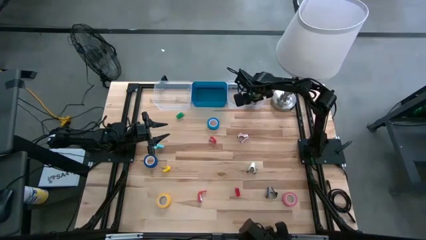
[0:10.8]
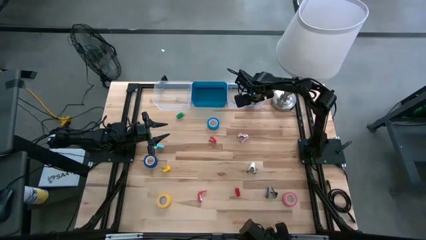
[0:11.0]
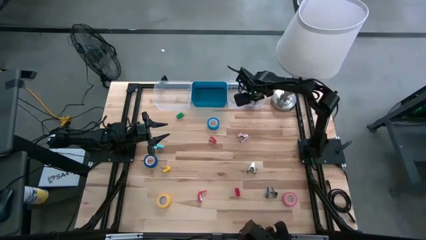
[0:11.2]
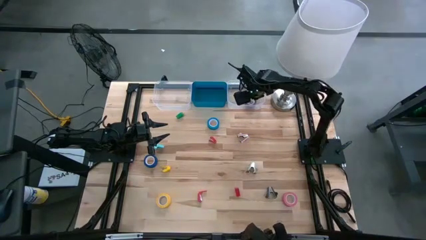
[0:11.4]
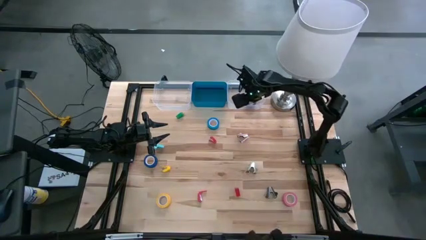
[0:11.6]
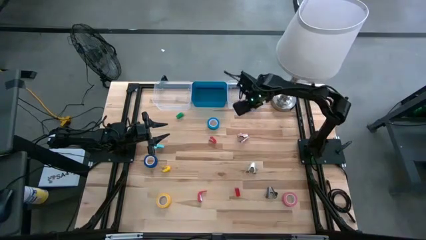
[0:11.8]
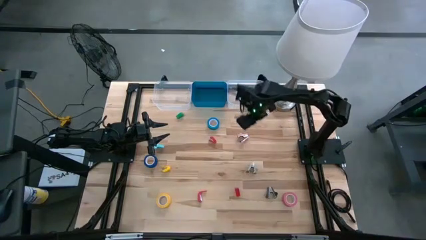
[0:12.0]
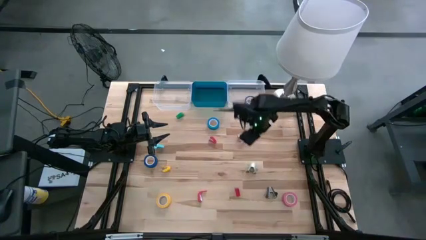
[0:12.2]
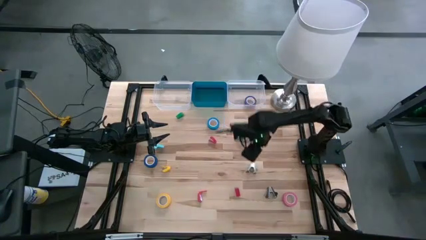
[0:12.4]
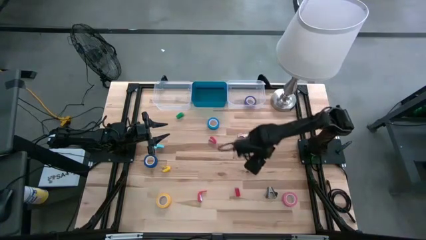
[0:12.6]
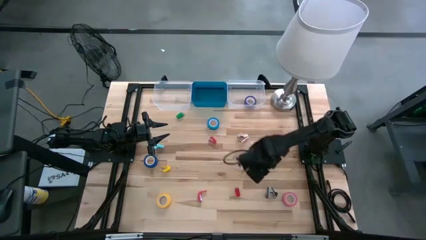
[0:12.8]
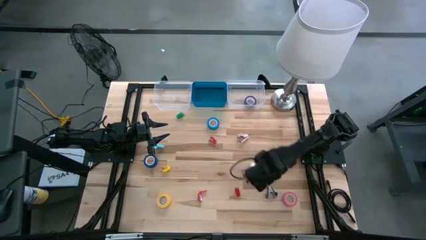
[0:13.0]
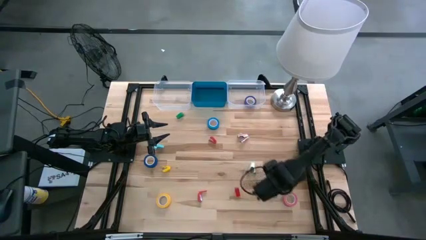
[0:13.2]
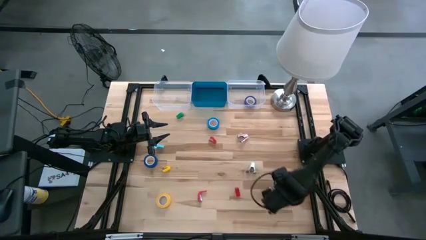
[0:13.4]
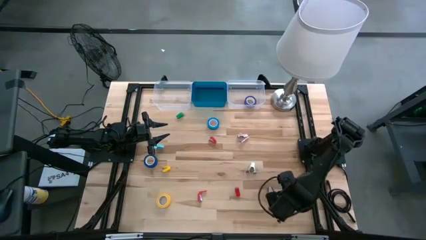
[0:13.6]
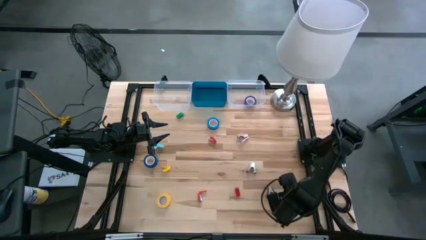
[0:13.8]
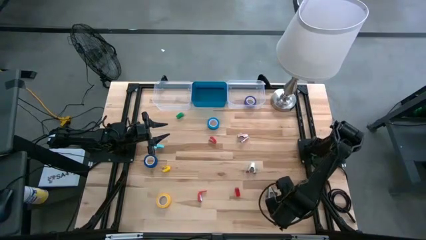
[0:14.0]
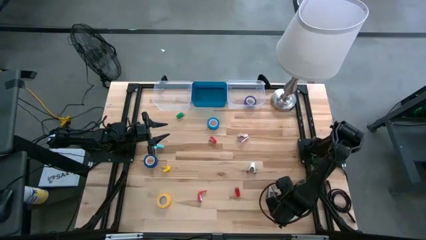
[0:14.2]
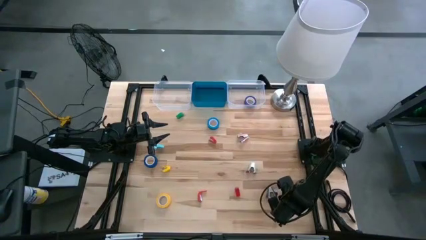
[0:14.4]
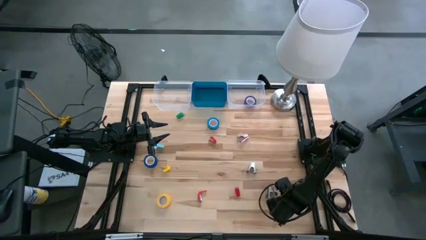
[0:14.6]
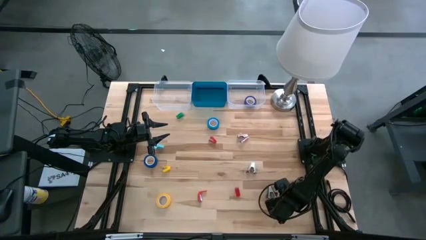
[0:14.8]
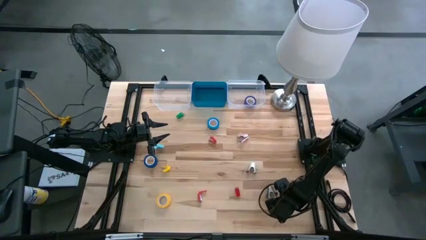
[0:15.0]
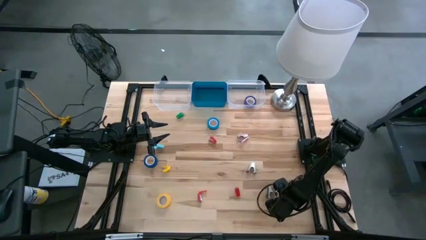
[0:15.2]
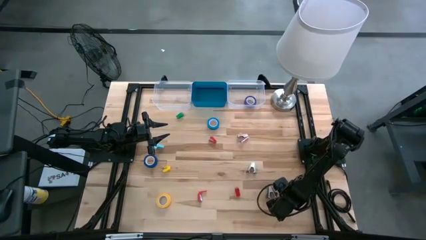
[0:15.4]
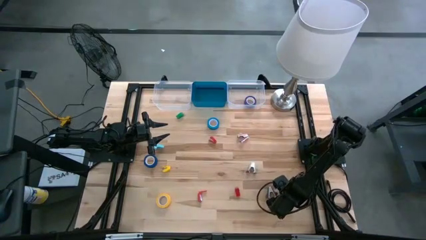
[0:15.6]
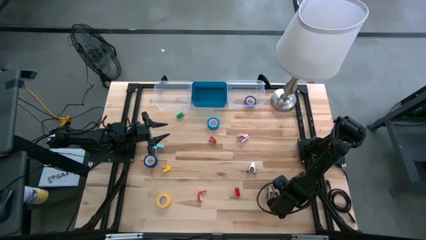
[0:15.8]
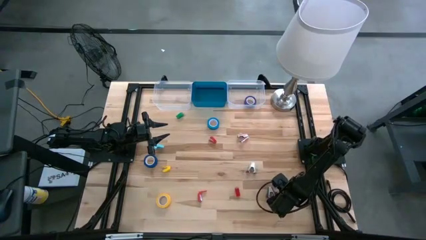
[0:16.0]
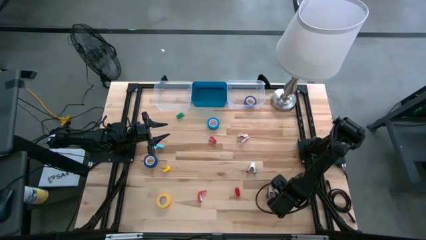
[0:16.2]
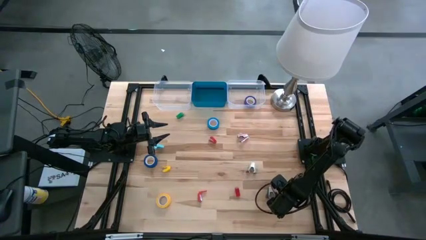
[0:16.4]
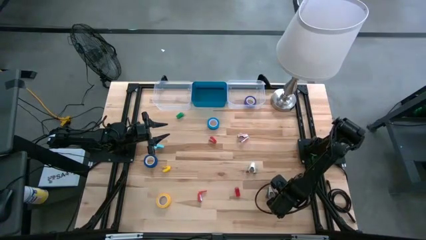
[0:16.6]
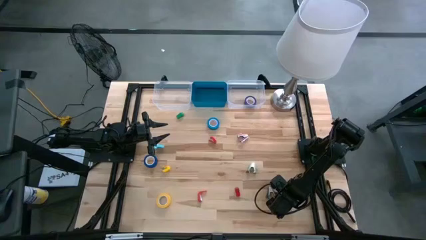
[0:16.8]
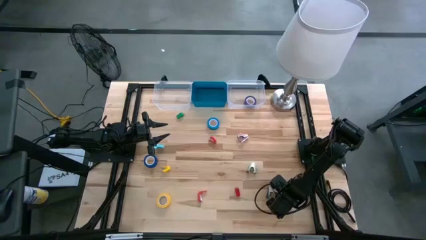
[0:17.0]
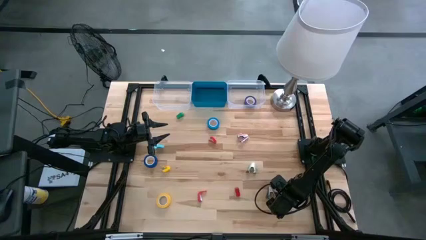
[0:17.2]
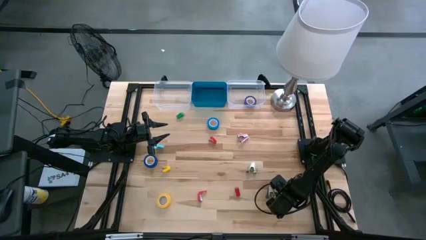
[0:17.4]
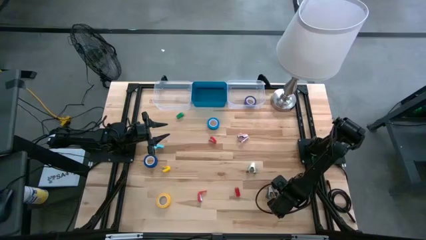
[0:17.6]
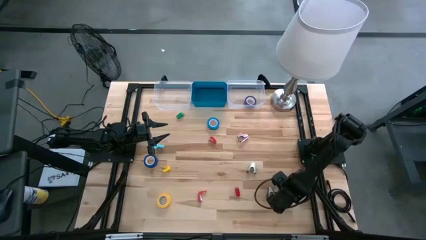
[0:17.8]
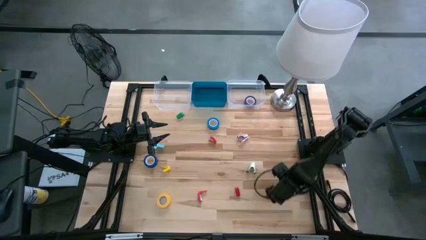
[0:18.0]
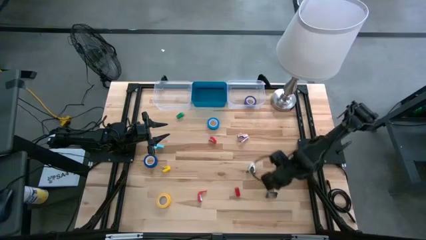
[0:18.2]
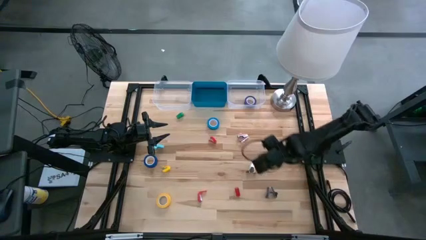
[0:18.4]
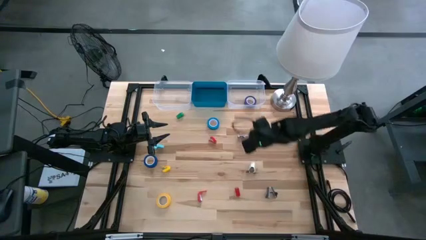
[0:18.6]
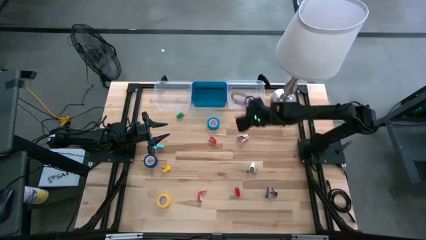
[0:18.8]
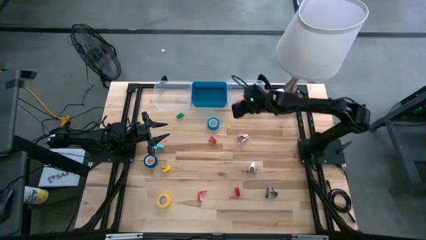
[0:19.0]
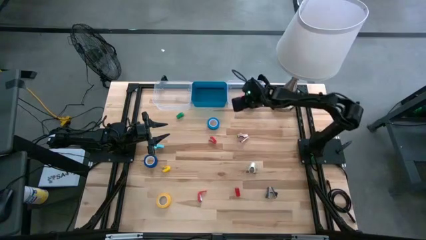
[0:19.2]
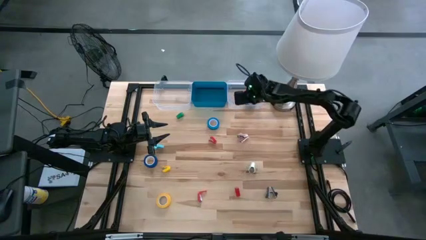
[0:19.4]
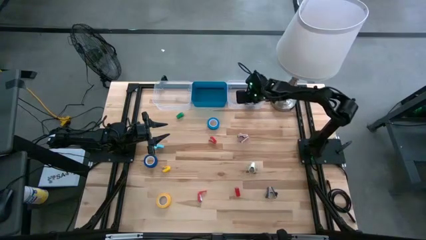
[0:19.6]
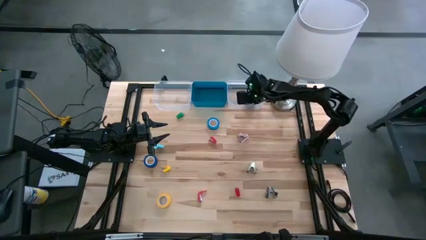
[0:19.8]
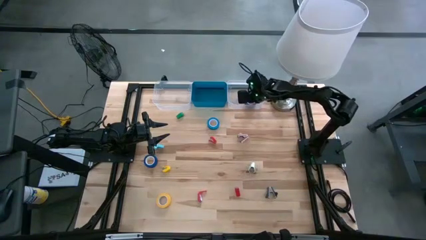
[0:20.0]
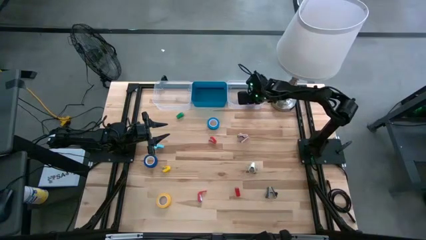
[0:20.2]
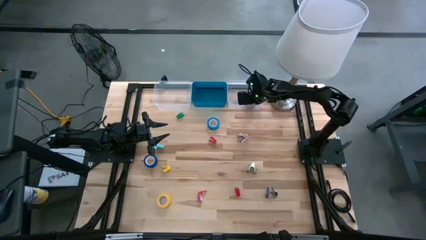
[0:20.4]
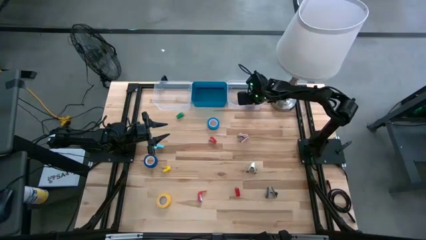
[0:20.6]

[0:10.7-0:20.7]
Task: Pick and place Stapler, Stapler remover, tape
Put the pink tape into the right transparent bin

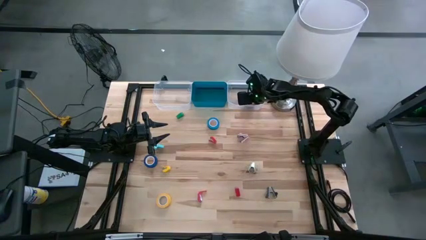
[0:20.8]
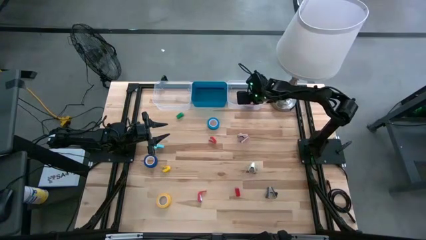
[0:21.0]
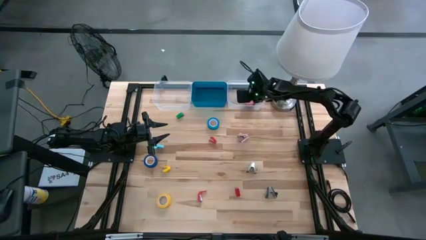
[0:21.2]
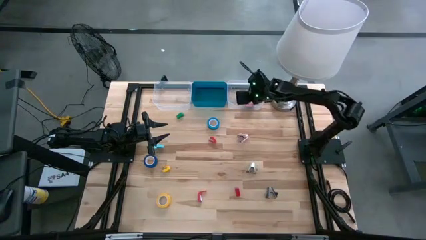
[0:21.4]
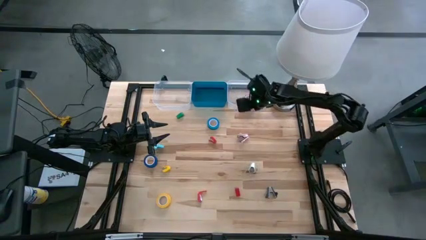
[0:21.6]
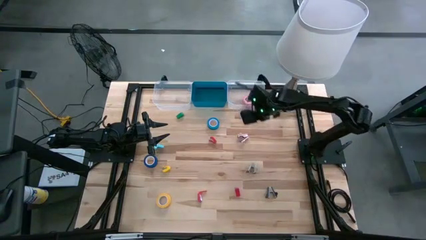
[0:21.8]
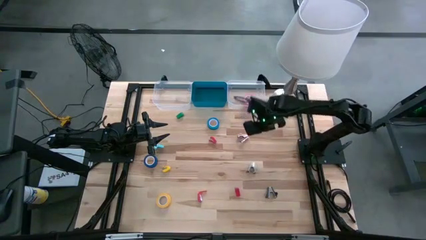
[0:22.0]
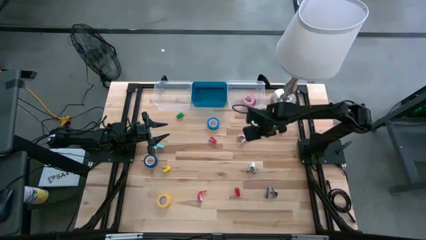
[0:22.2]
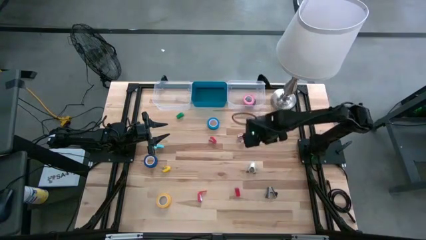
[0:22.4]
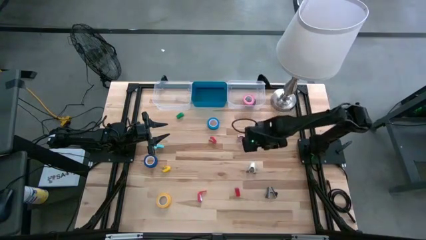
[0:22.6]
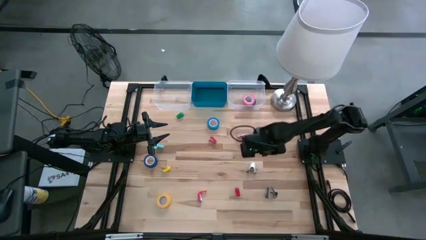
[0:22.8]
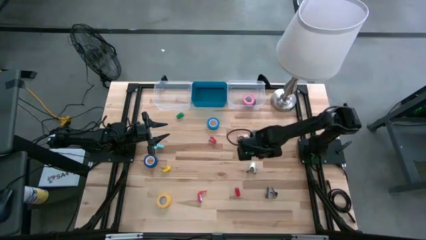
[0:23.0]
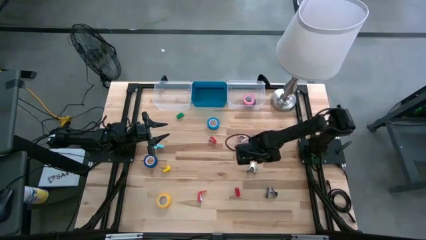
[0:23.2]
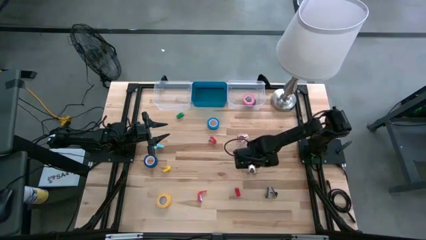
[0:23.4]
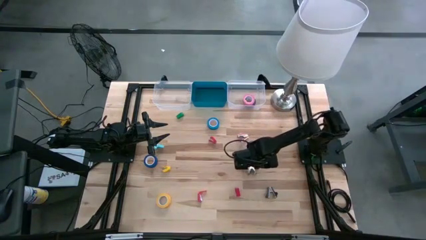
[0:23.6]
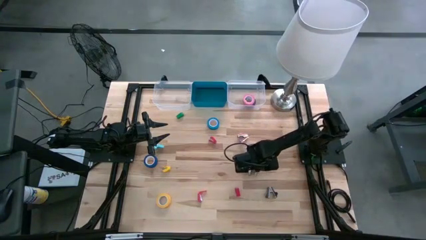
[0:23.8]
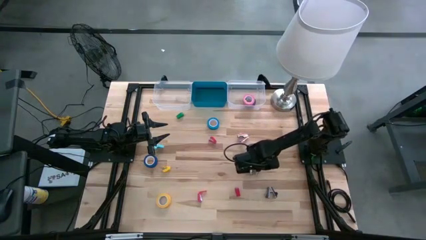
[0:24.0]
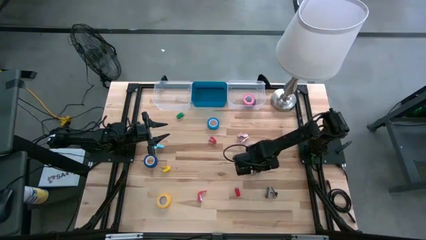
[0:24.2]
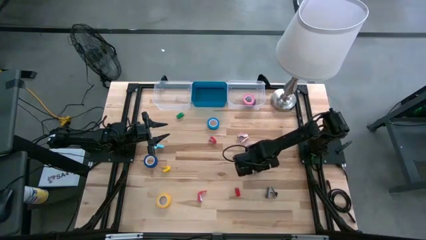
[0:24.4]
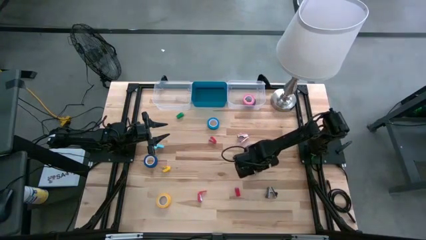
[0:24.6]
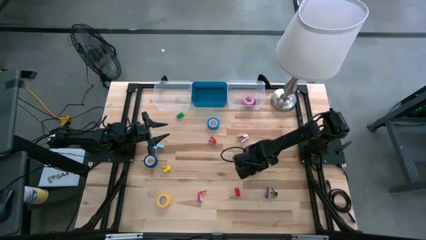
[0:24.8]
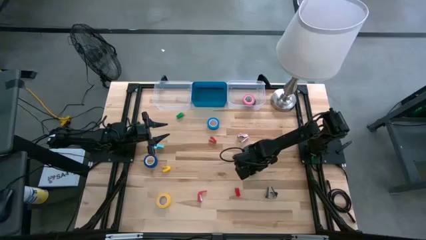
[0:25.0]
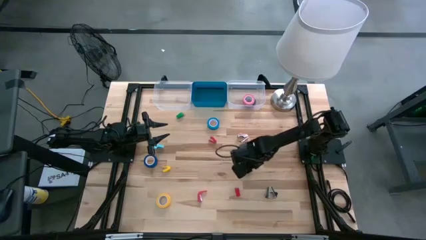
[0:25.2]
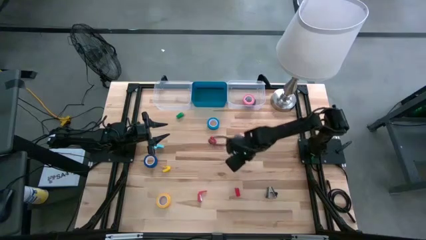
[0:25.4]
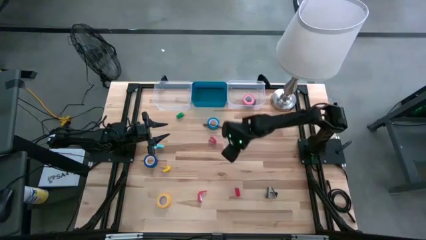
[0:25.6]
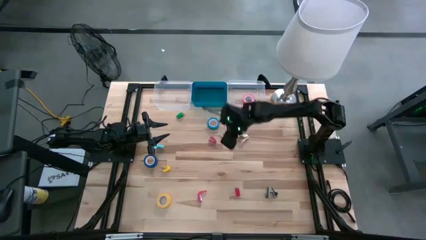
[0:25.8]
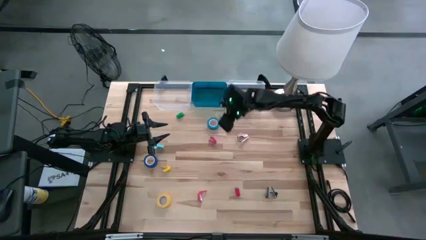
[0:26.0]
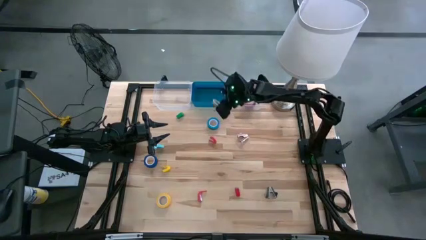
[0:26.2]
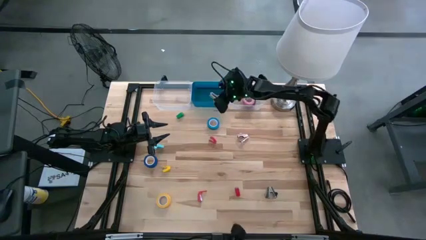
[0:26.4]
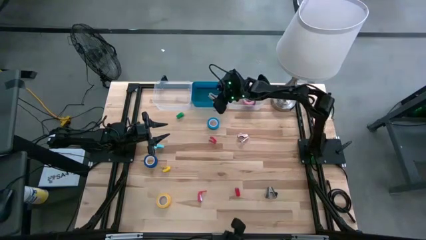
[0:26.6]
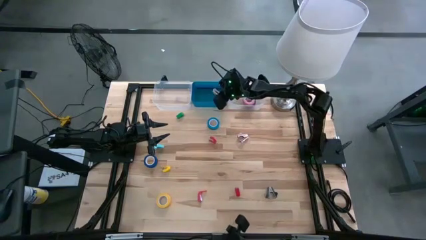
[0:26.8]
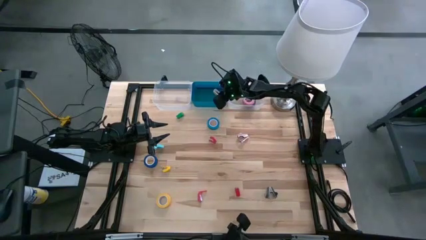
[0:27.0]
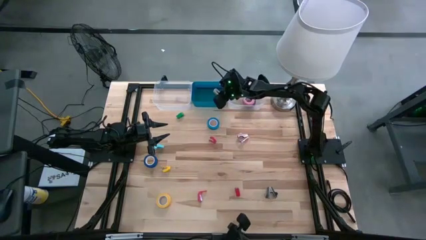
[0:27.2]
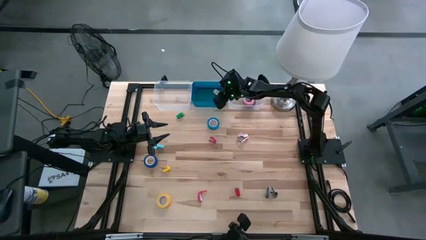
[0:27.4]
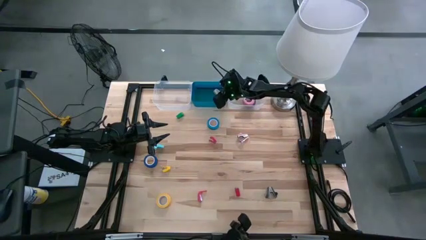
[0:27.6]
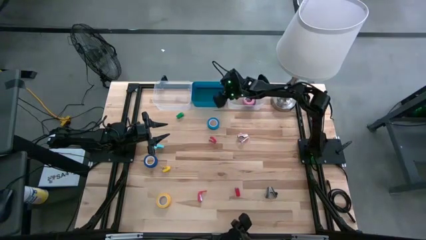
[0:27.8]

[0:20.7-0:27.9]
Put the white staple remover into the blue bin
